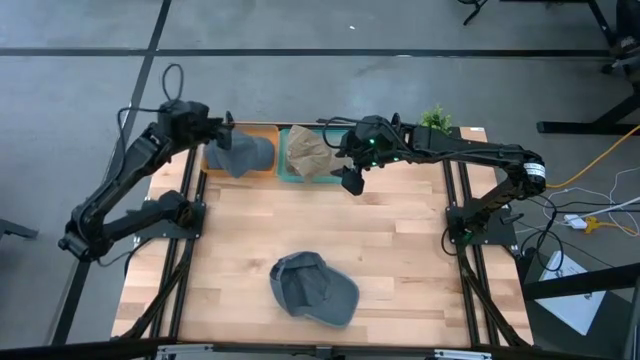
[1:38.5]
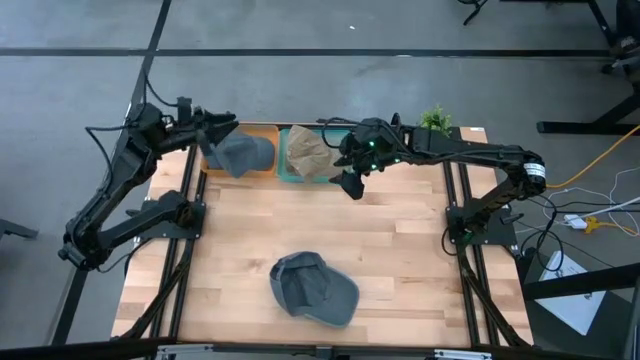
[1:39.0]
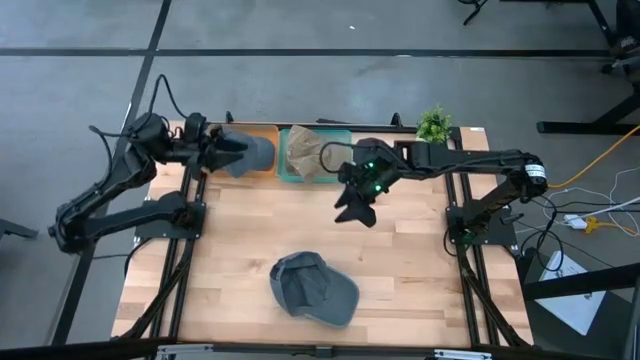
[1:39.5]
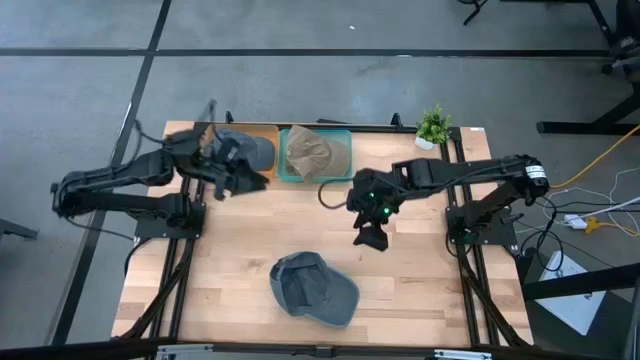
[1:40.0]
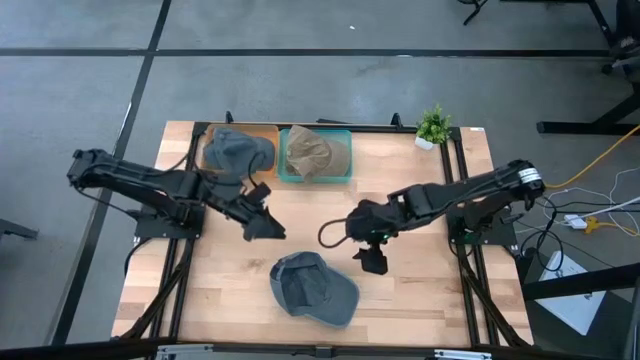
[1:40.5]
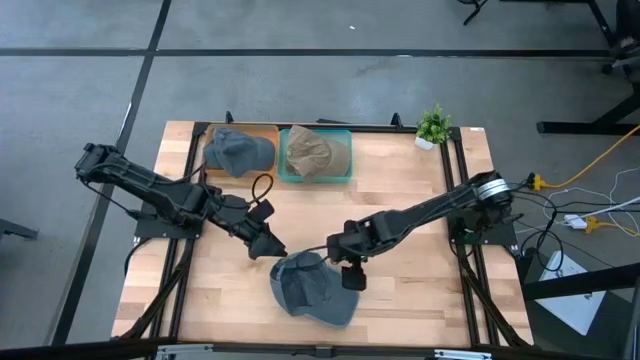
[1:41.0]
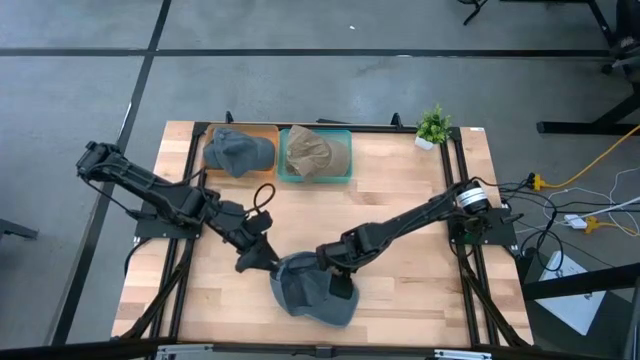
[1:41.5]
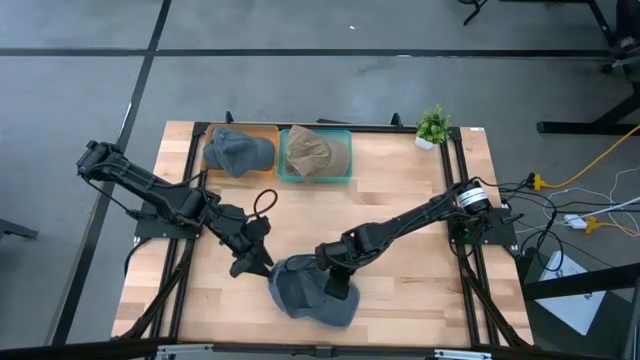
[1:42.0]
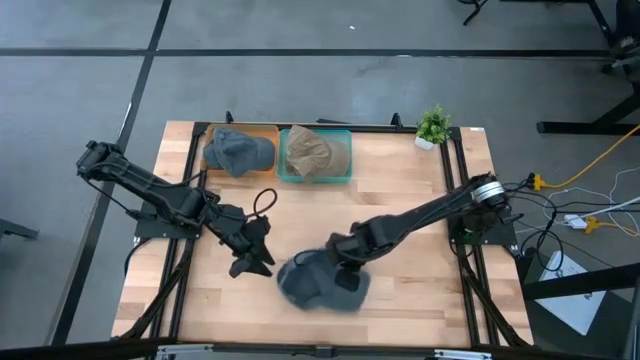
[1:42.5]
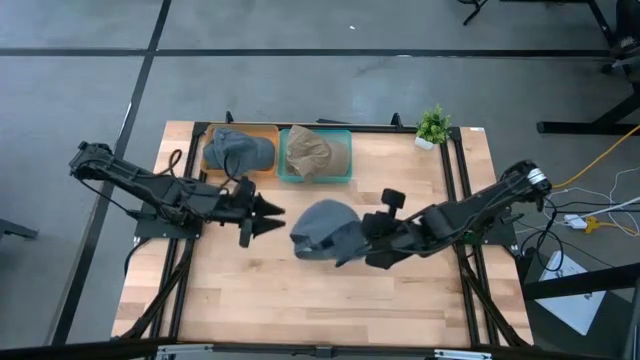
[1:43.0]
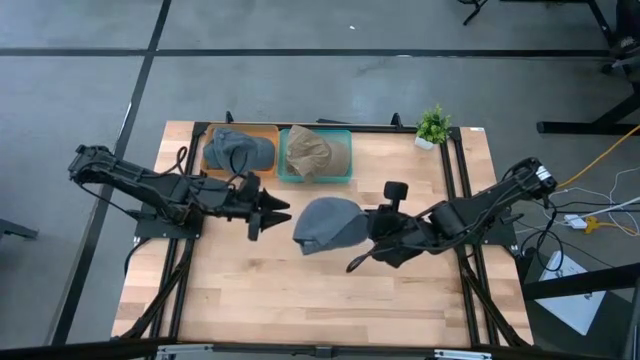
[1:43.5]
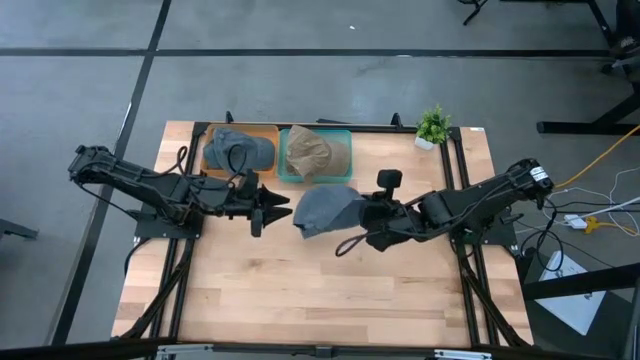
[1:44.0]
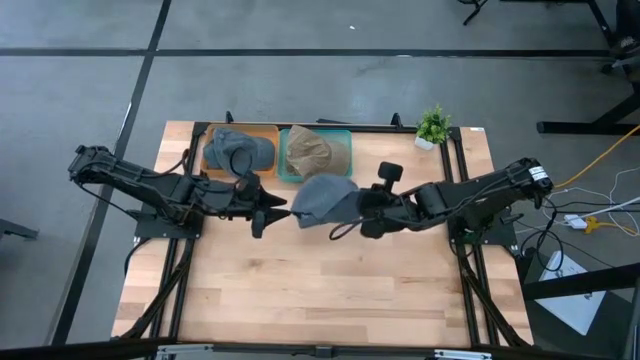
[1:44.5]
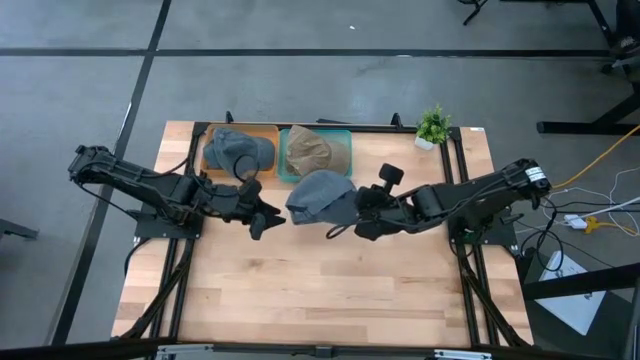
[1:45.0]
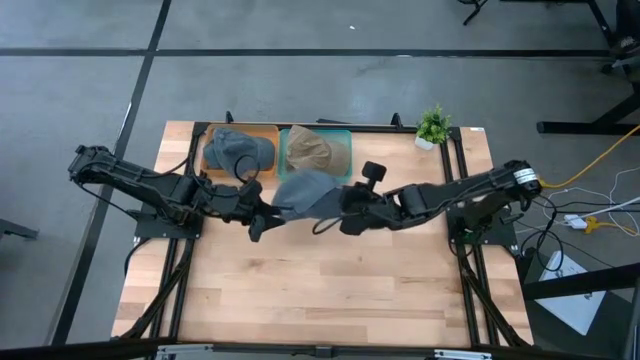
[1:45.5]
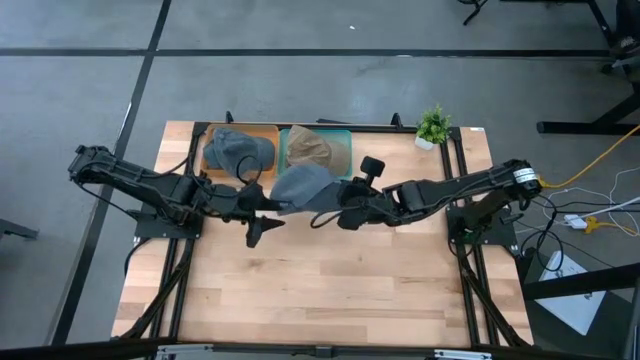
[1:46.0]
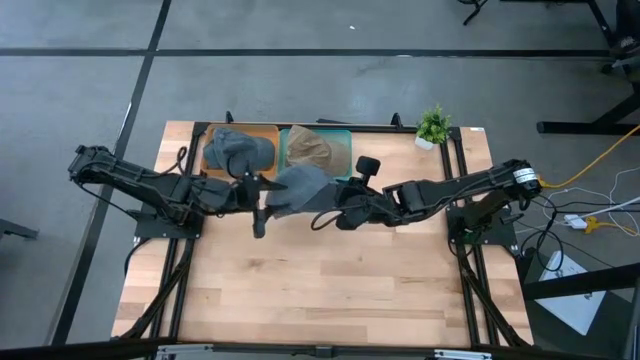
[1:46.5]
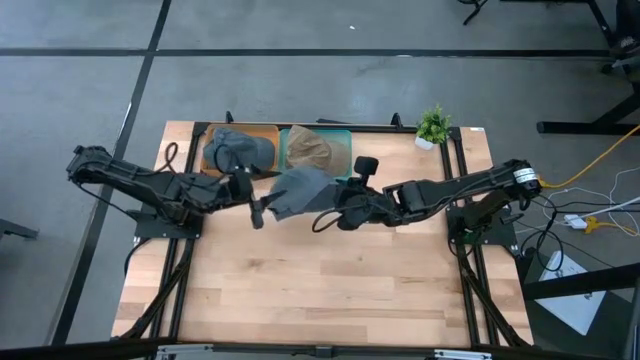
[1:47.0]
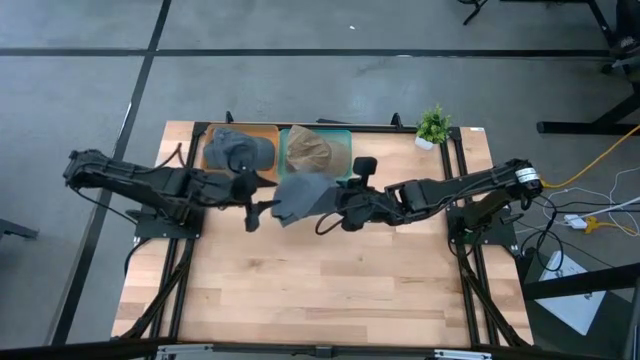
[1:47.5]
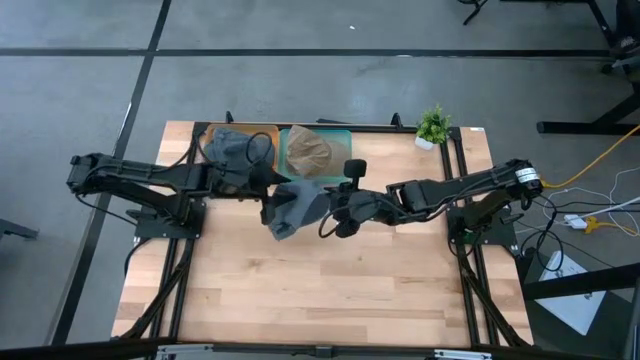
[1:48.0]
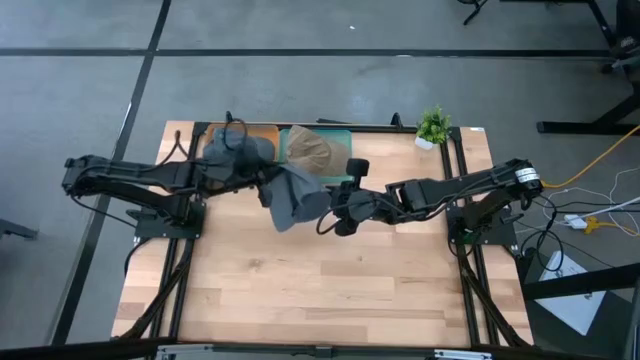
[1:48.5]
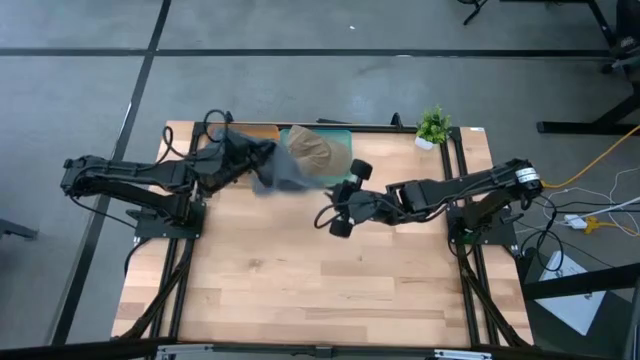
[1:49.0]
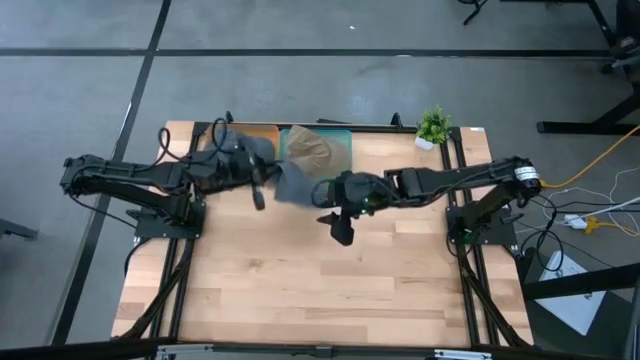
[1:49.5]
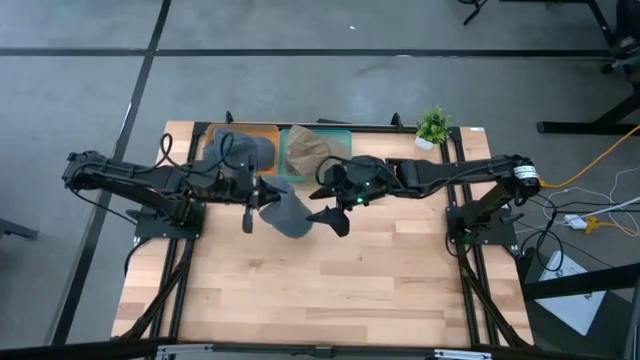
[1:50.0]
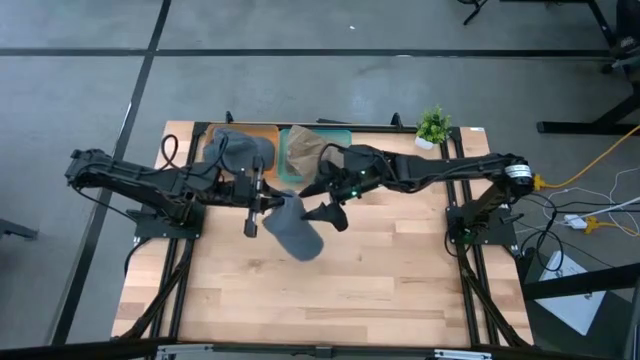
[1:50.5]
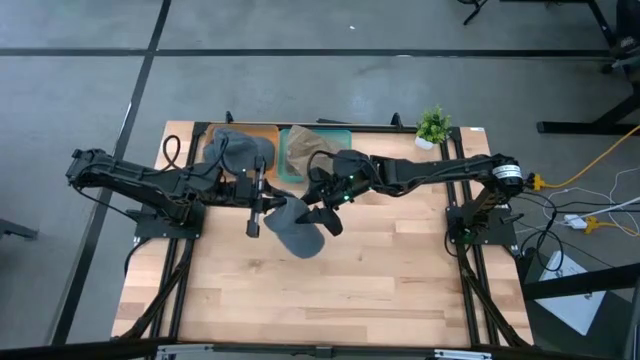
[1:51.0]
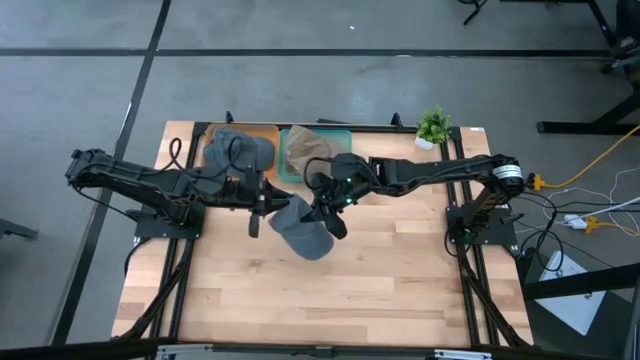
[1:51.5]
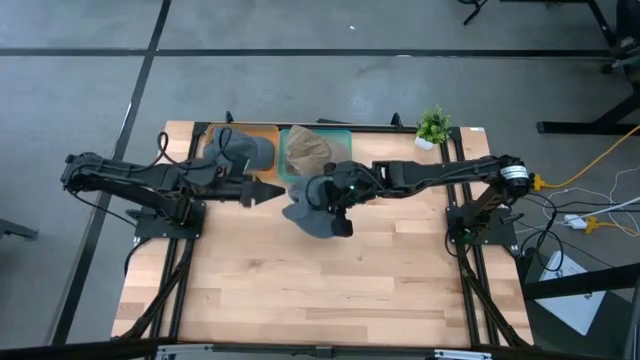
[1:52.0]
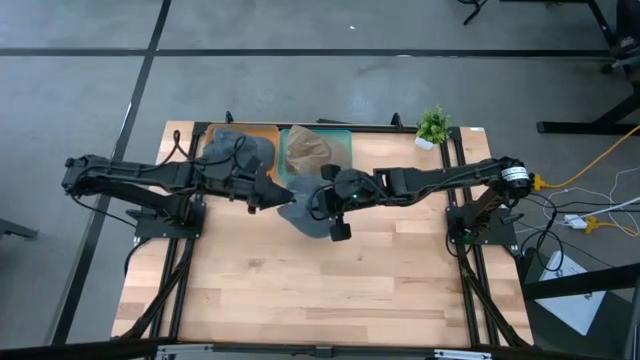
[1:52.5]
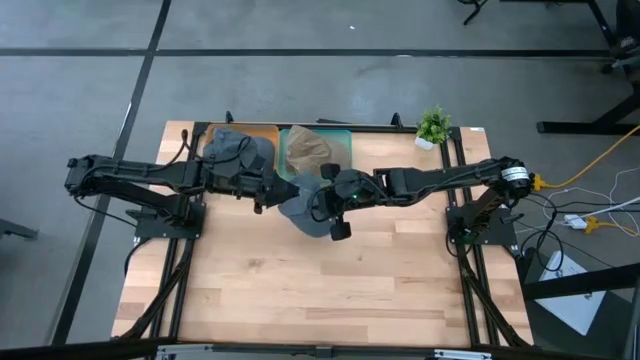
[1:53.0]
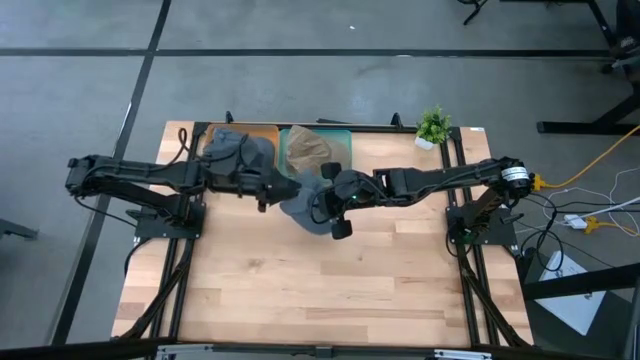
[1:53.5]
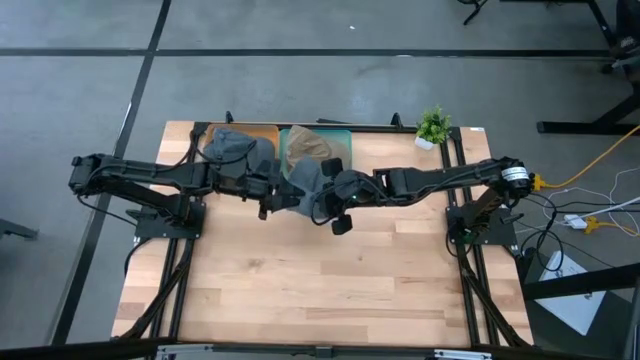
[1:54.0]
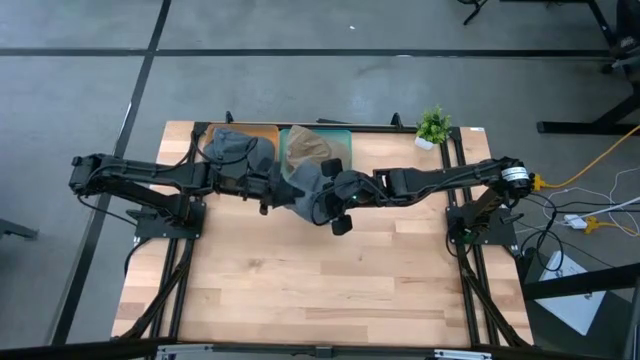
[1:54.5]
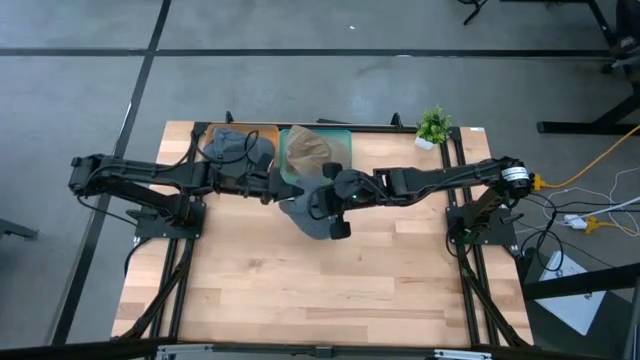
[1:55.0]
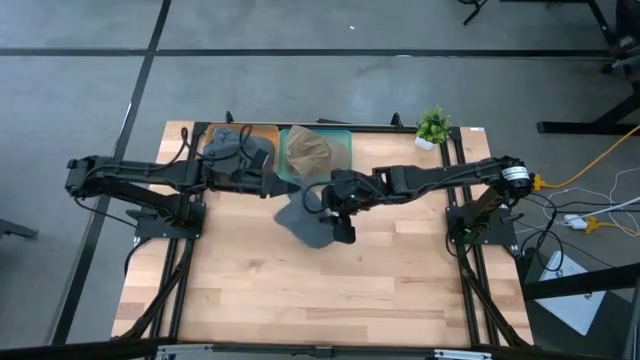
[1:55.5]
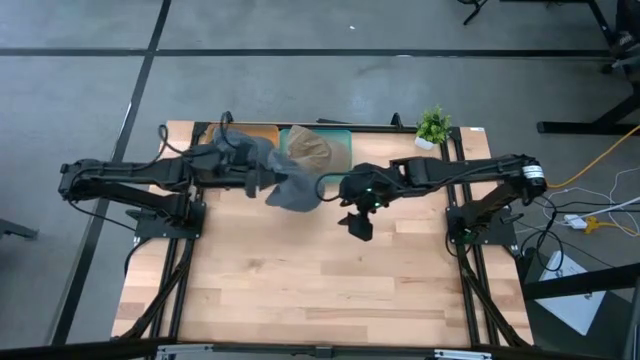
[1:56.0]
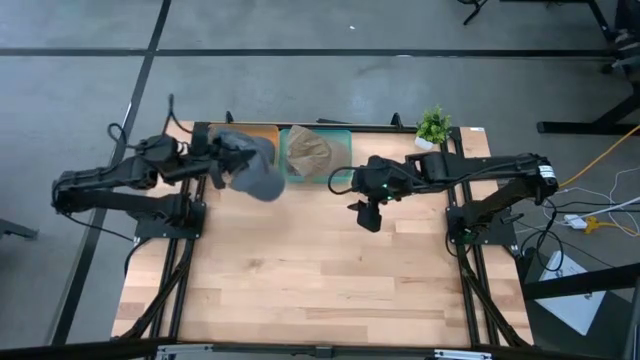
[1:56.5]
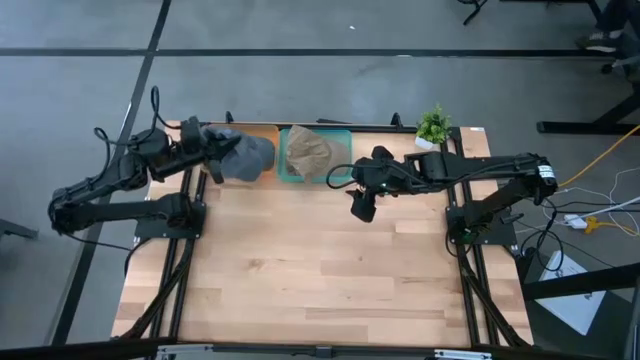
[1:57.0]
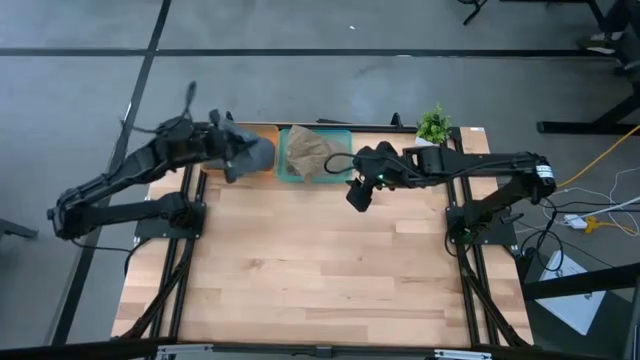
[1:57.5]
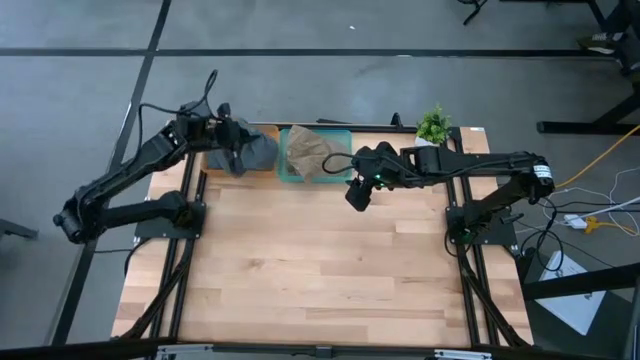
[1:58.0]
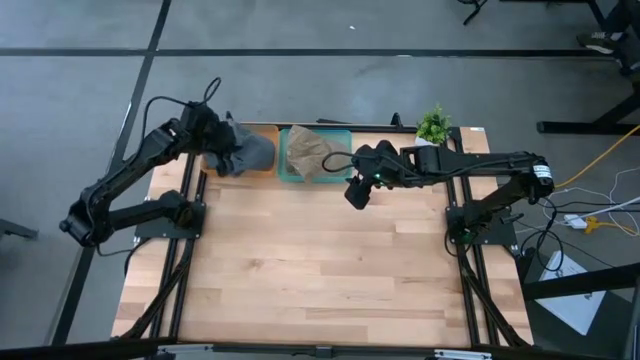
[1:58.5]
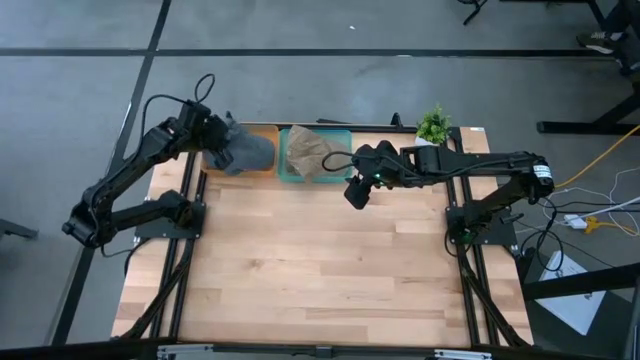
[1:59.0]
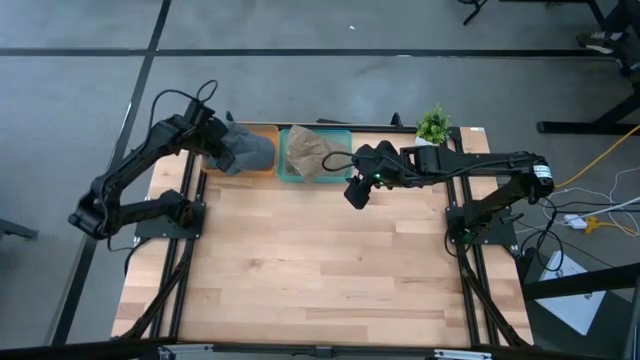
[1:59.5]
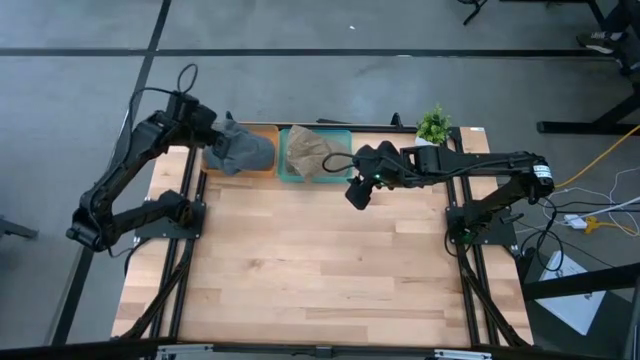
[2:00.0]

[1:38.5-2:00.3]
Task: Pick & Place hat
Put the gray cap into the orange bin
